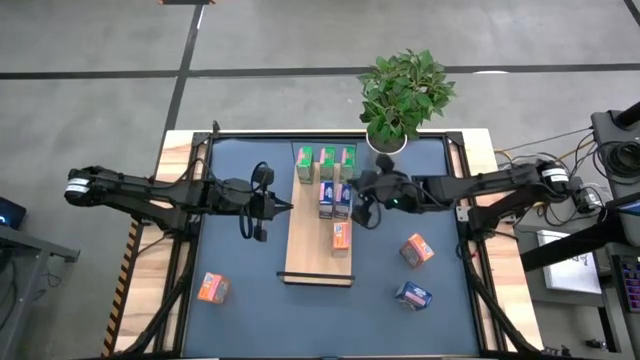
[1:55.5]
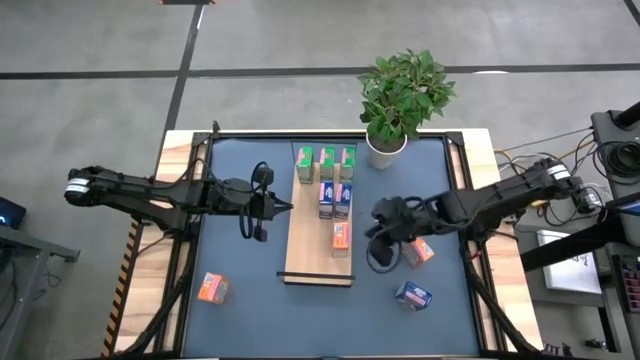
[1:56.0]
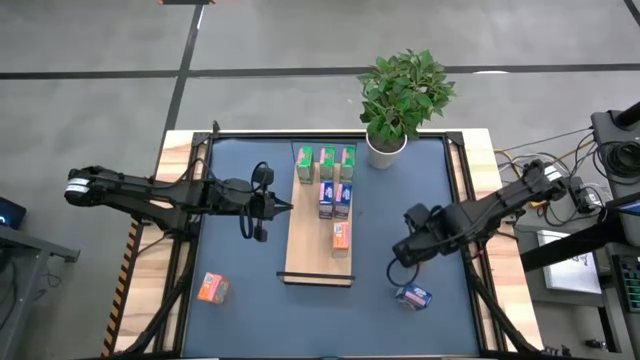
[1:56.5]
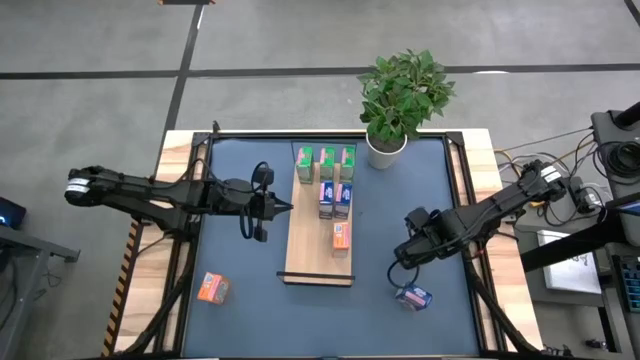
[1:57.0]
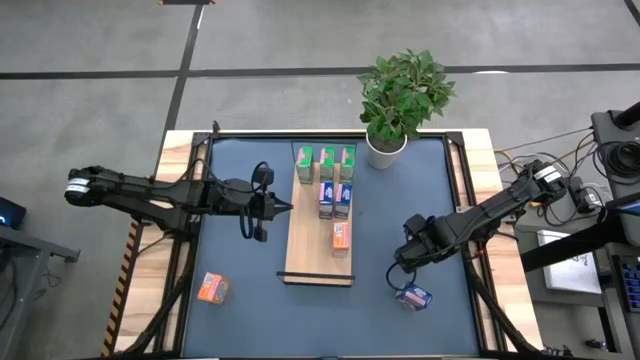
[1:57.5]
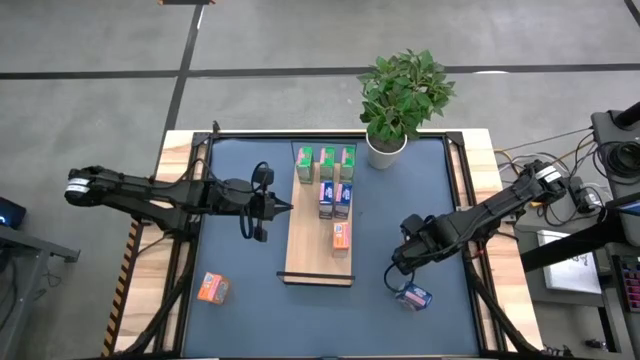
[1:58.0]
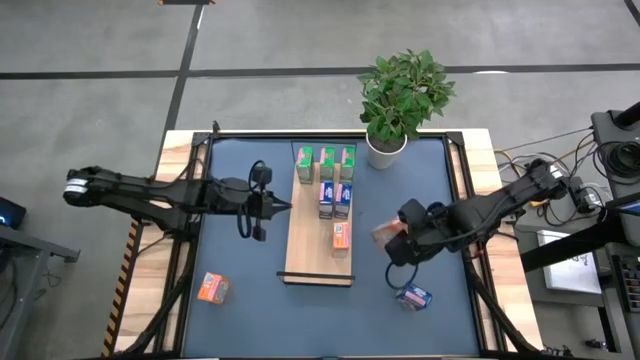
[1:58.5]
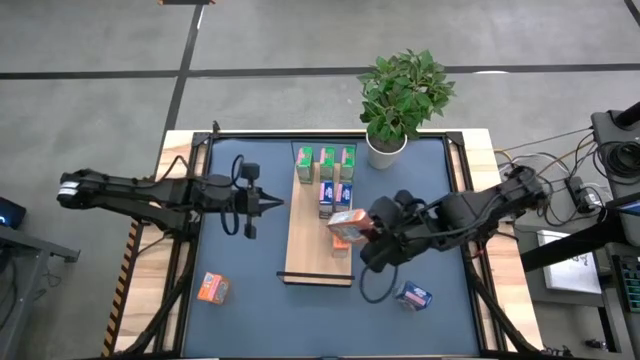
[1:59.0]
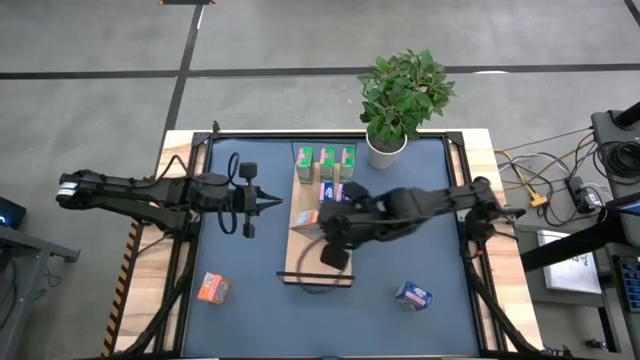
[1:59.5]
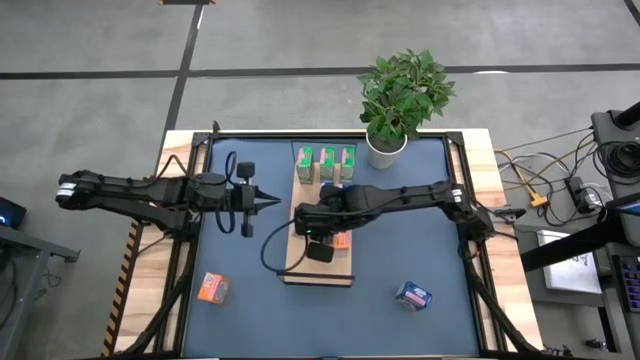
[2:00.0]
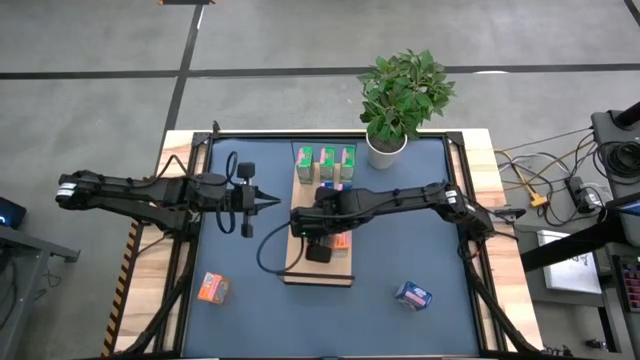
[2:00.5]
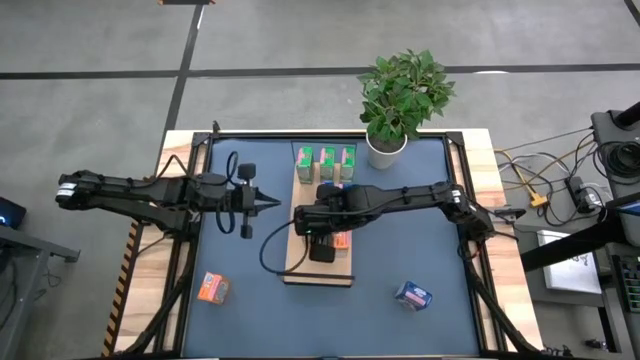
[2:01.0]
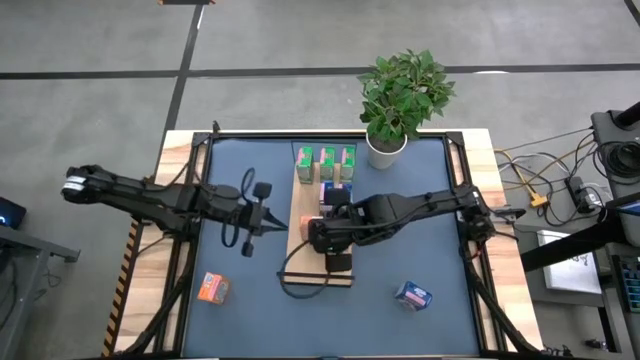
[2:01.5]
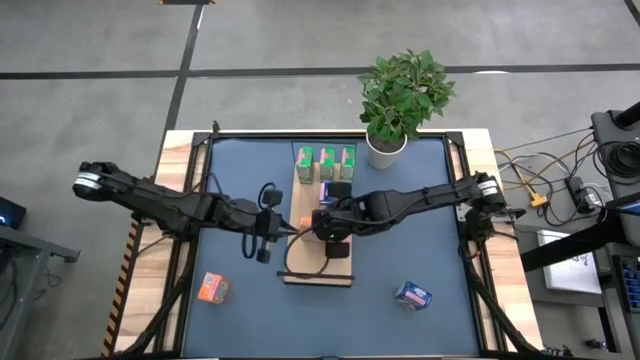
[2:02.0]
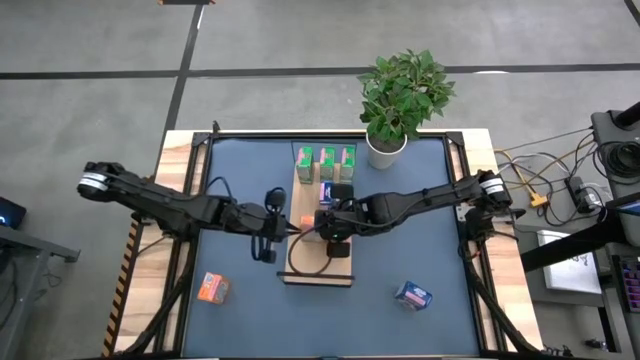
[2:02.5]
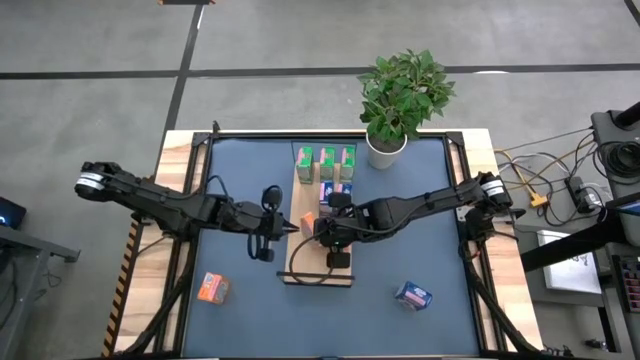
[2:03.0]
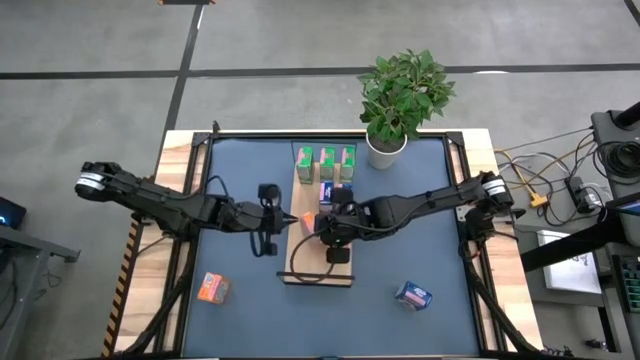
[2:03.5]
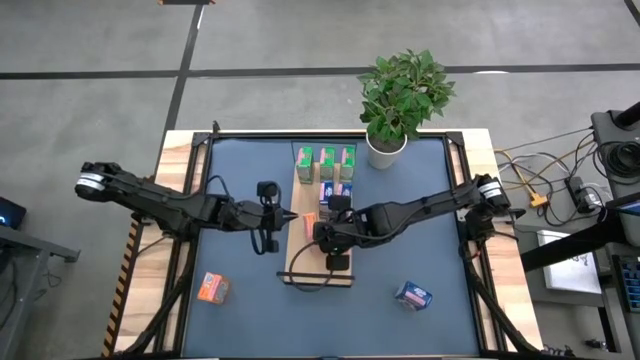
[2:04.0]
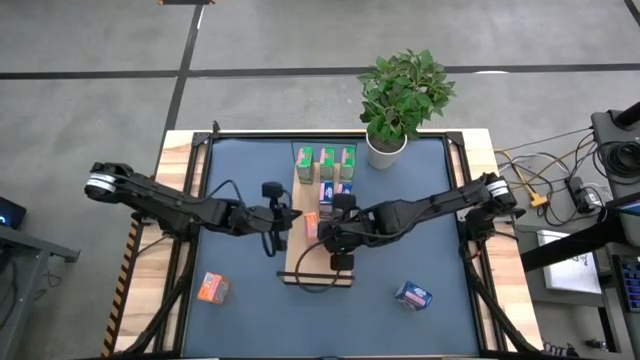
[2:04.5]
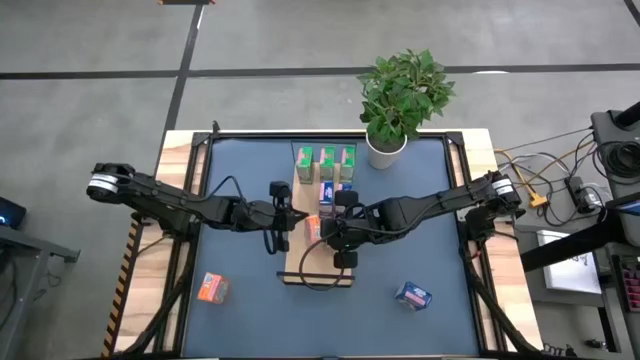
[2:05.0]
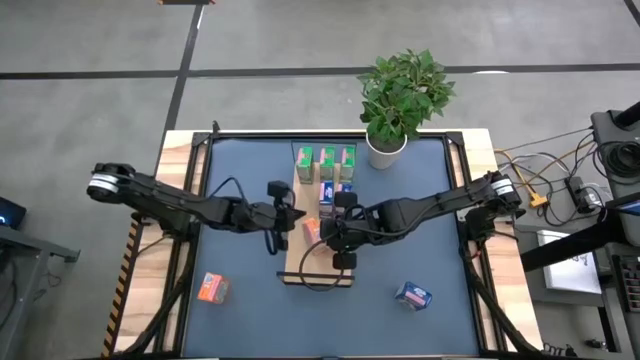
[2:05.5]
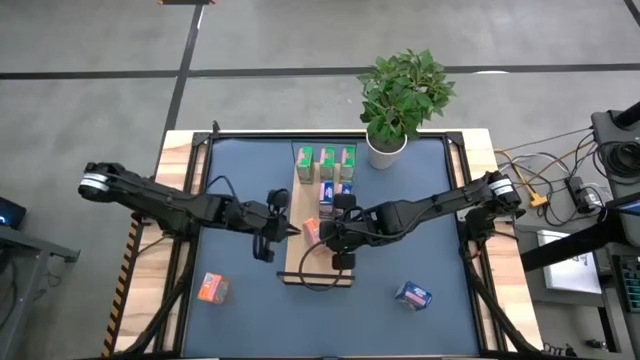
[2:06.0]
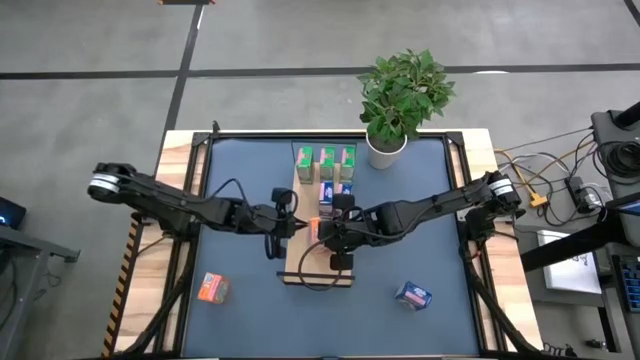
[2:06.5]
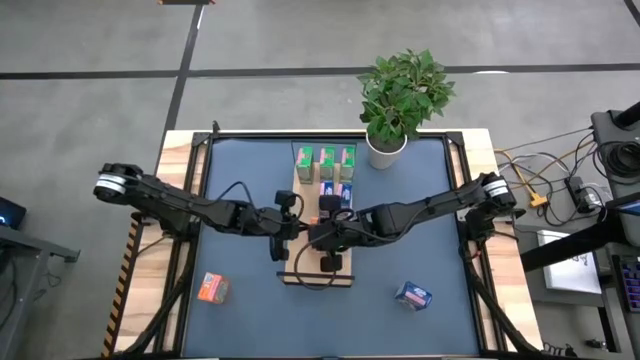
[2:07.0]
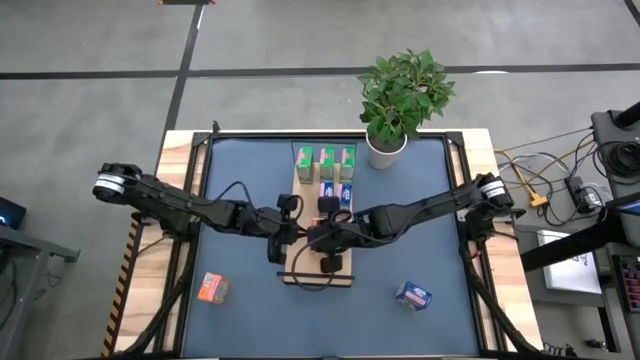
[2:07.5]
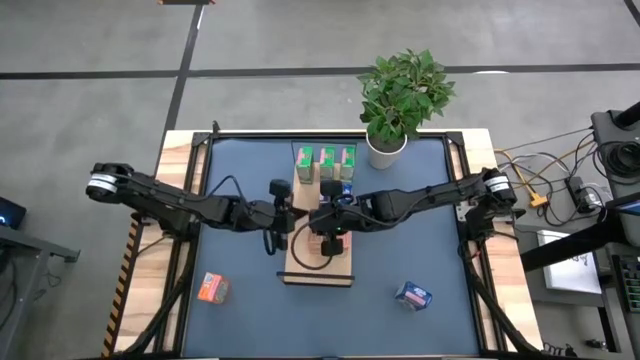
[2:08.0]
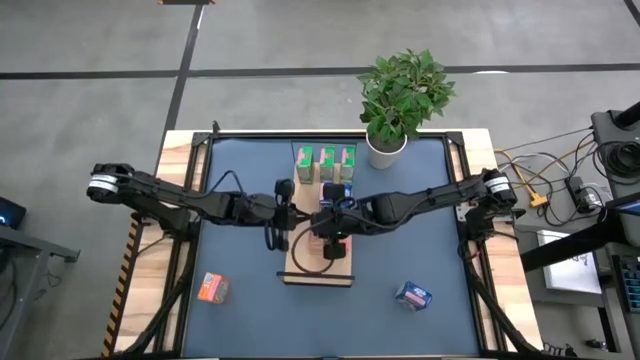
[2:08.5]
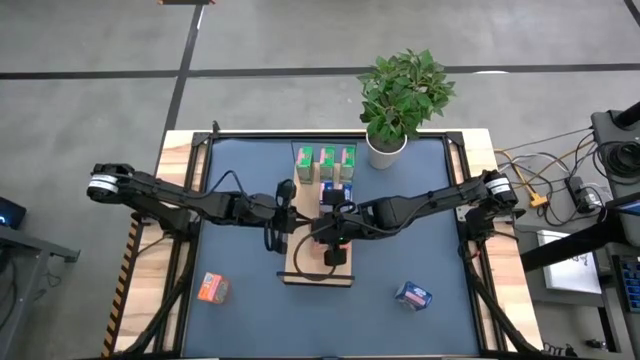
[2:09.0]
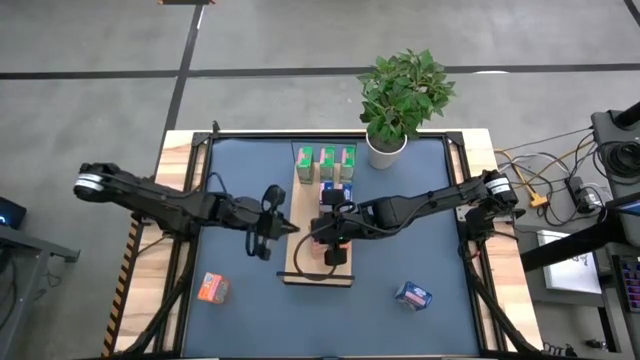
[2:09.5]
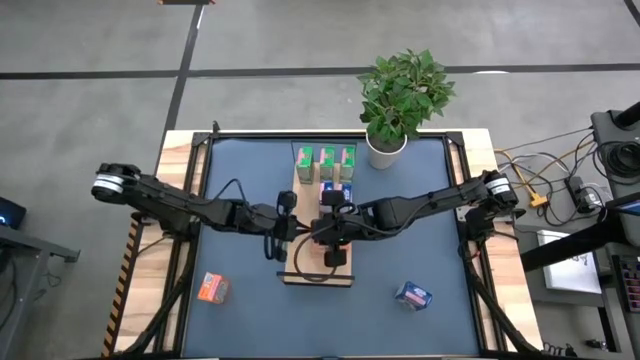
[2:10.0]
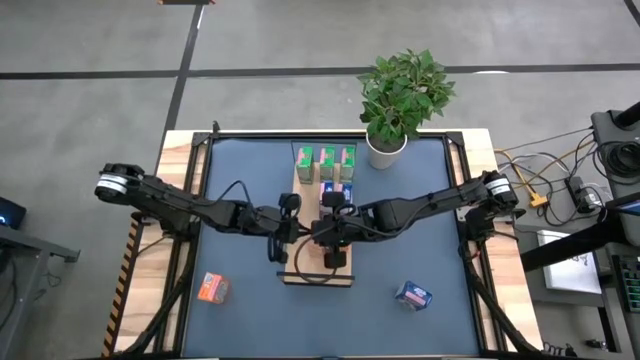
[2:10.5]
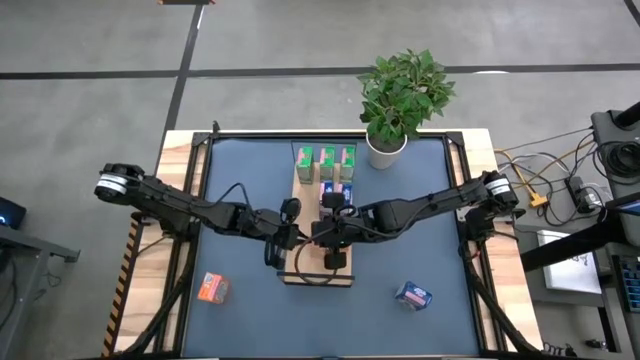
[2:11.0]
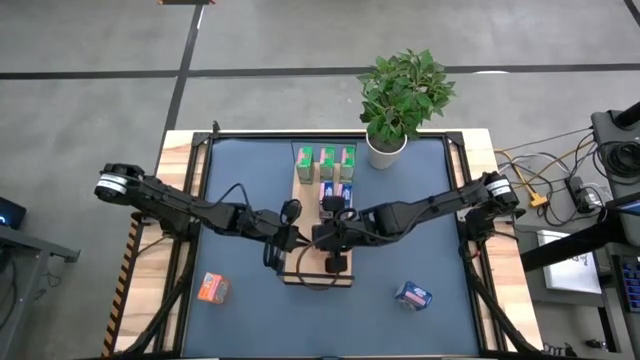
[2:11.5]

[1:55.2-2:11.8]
Task: Stack cereal on shelf
Put the right orange cereal box on the shelf aligned with the other orange cereal box

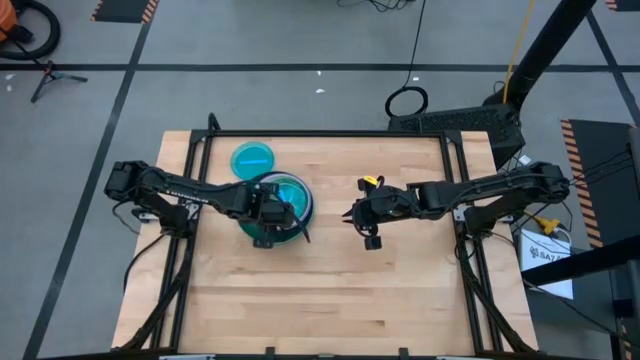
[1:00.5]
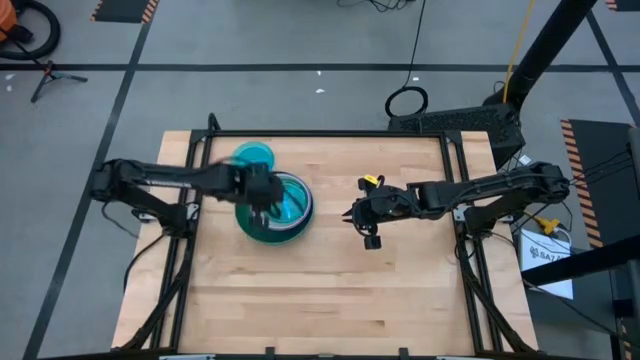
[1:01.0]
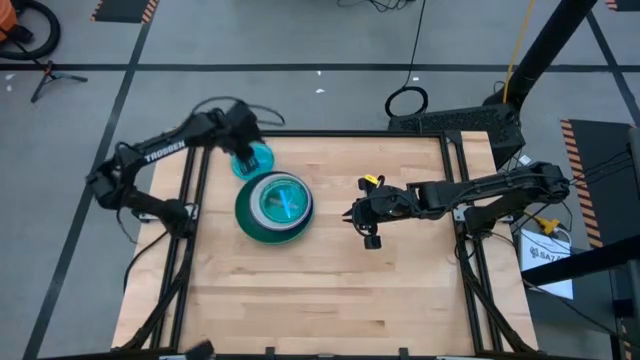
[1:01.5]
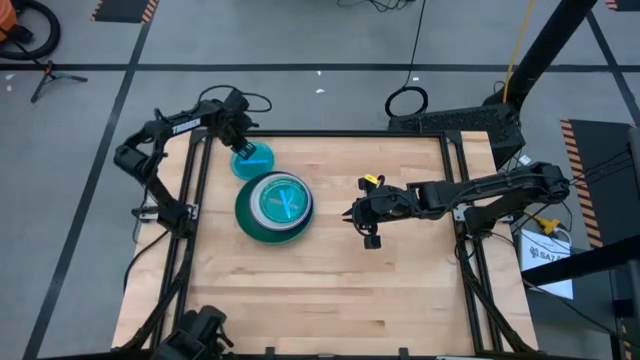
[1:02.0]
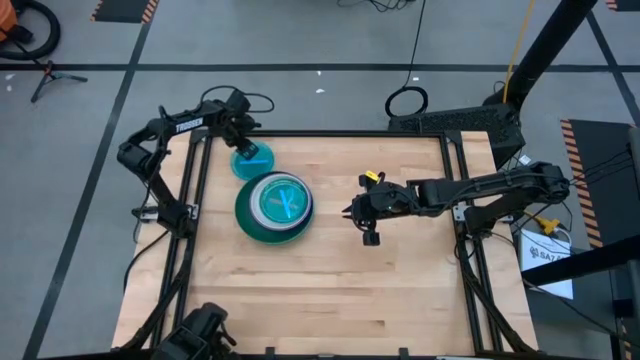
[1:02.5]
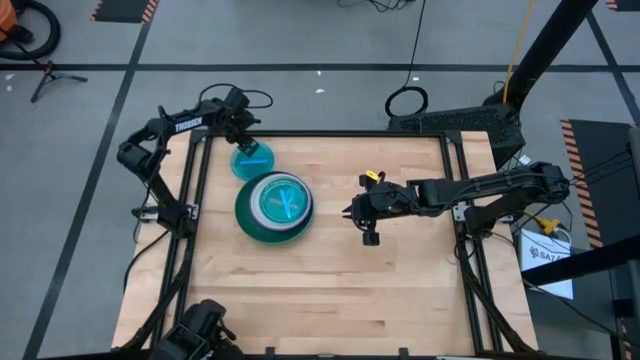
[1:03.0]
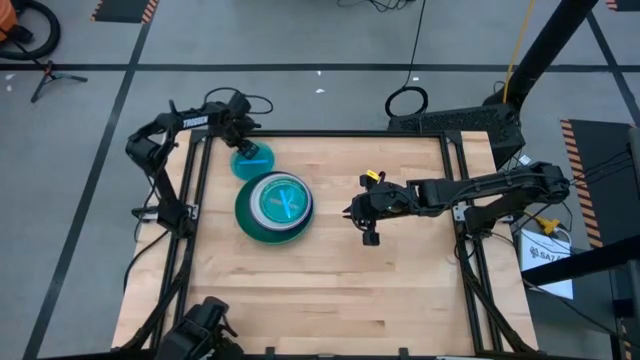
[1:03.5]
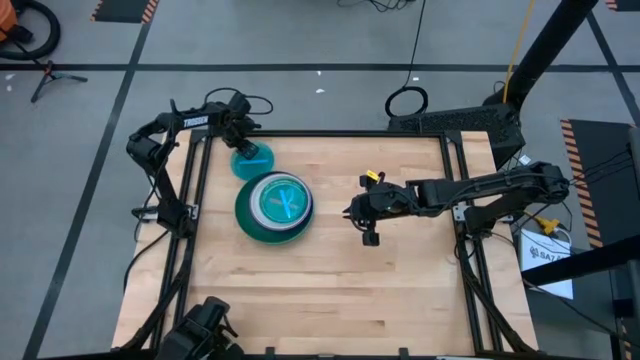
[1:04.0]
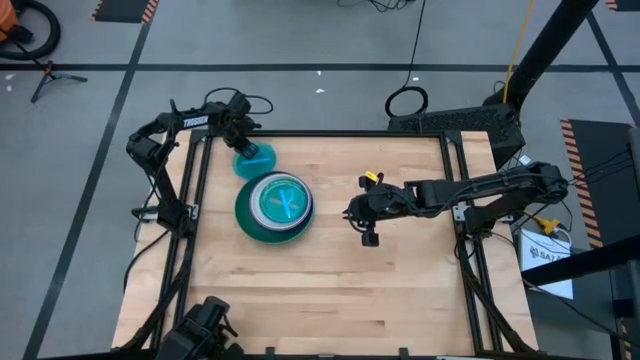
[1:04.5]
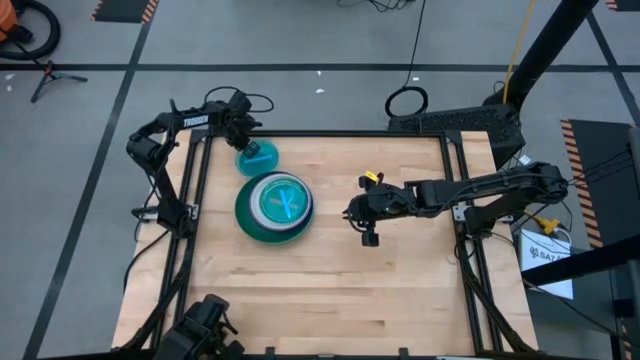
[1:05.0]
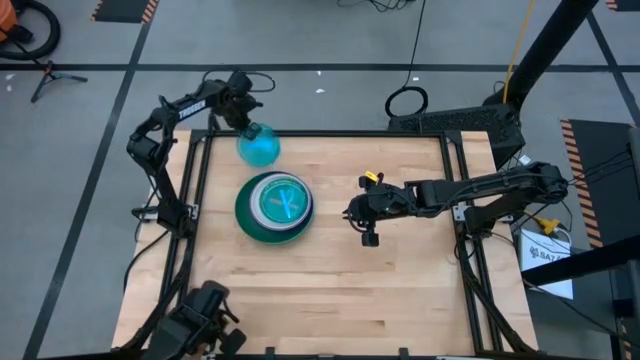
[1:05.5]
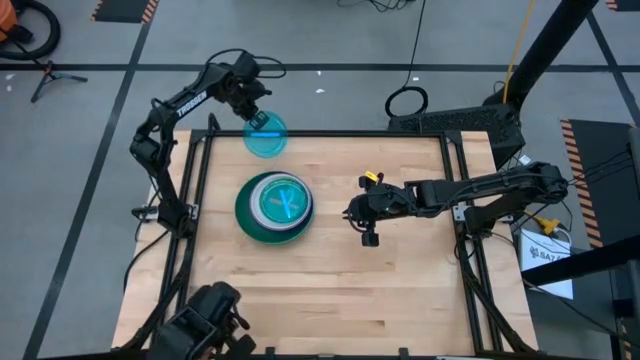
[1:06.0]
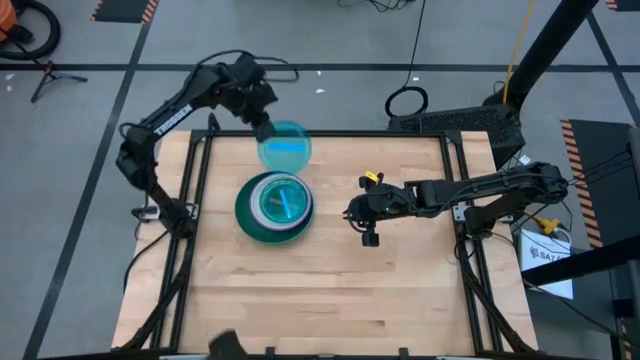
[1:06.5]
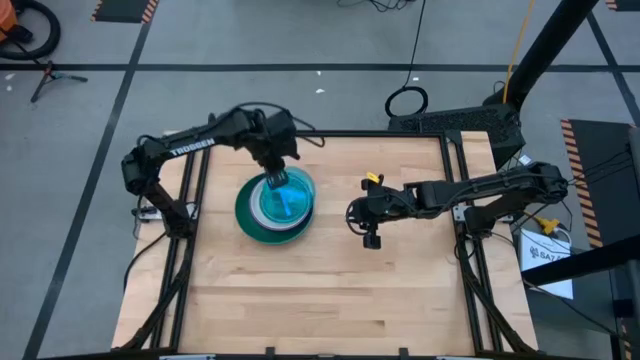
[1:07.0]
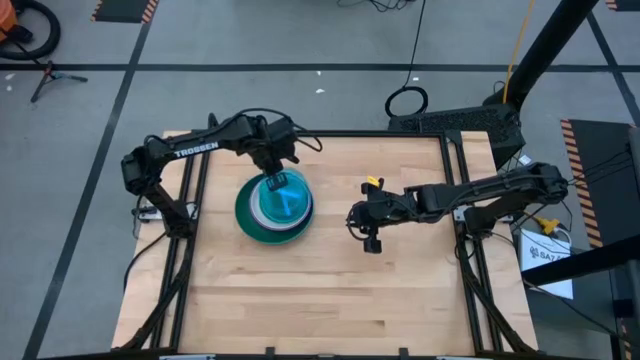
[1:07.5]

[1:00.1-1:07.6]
Task: Stack plastic plates
Stack the blue plate on top of the blue plate
